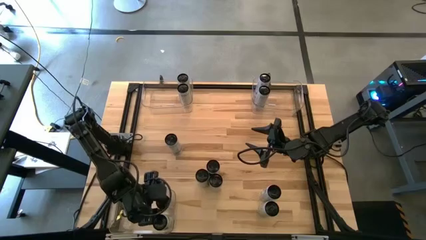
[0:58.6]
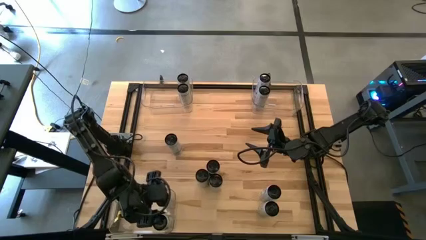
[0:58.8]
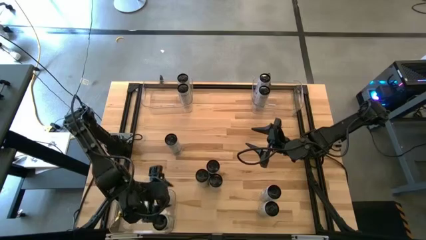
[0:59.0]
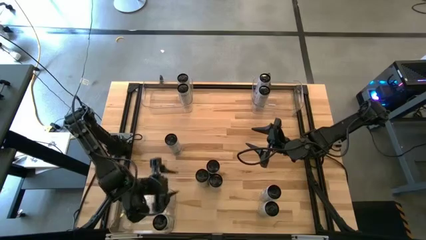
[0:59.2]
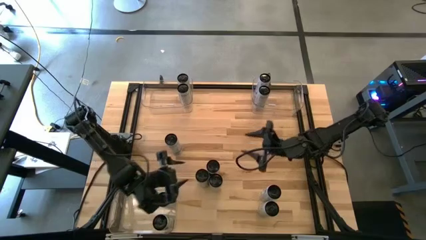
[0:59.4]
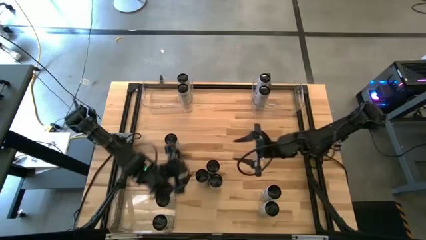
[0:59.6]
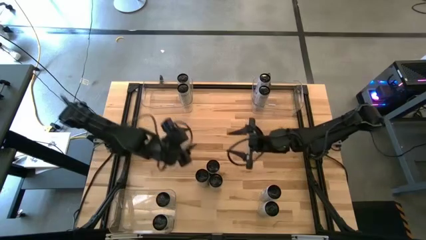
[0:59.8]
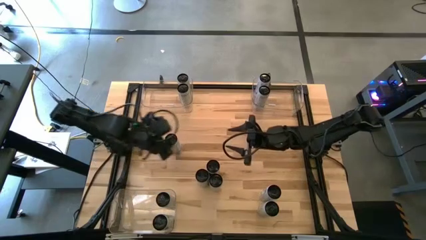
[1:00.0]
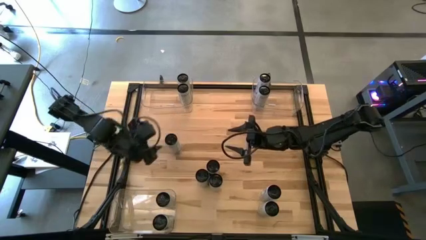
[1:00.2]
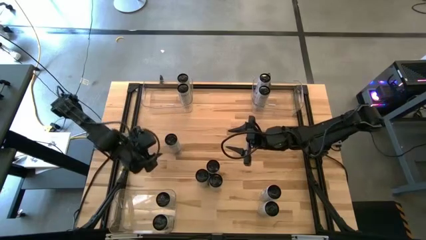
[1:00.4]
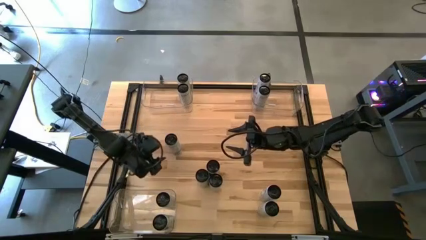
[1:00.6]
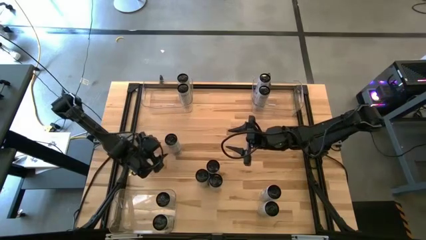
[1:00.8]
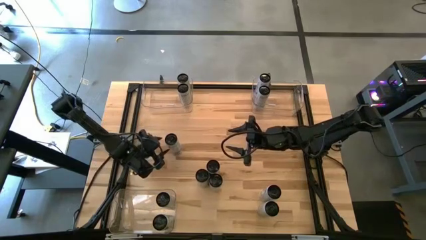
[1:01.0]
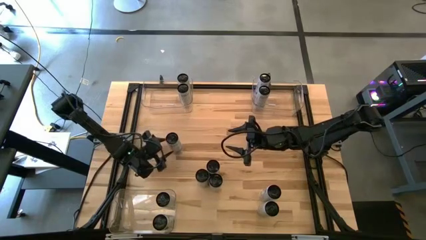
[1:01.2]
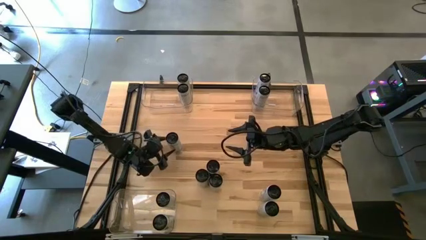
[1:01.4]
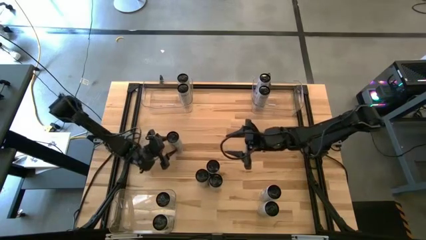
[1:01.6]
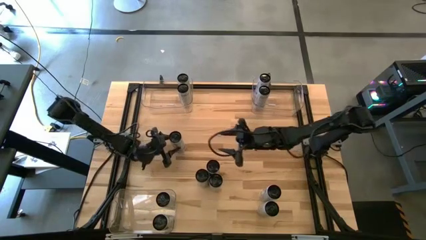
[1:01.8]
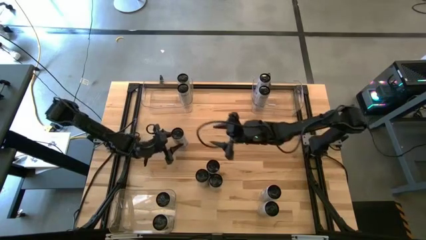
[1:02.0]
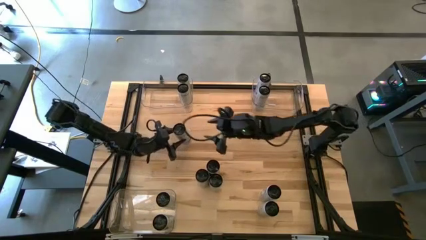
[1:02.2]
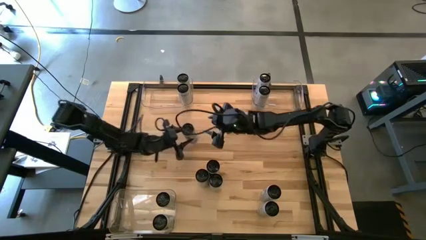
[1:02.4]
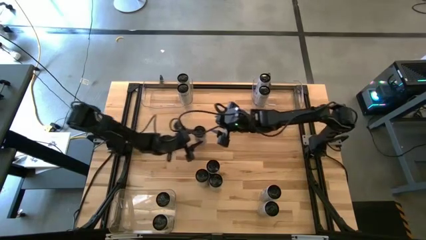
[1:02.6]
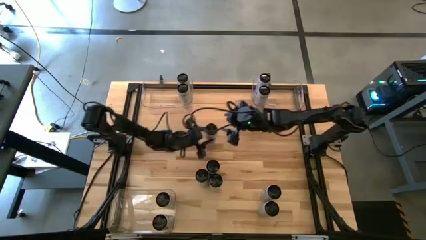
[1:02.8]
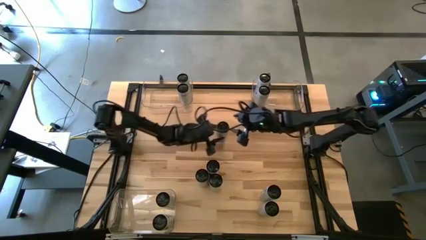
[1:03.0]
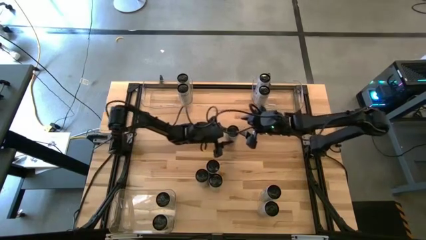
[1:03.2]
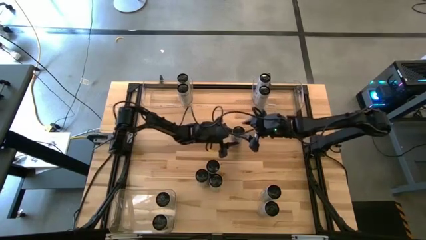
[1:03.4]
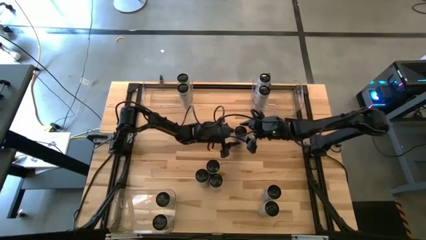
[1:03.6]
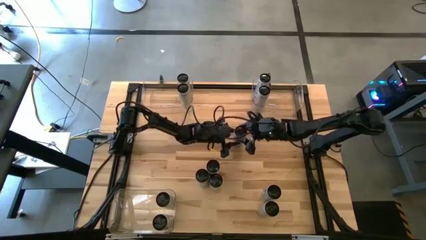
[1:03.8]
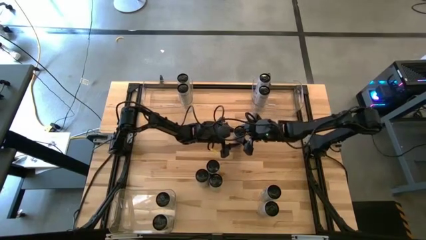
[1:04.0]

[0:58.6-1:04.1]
Task: Sort soda cans
Move the white soda can to the top center

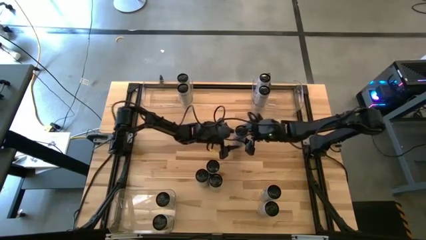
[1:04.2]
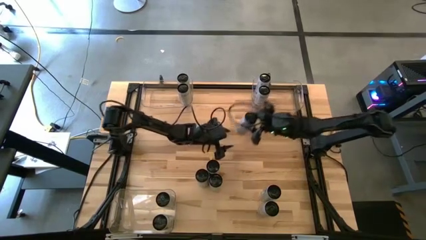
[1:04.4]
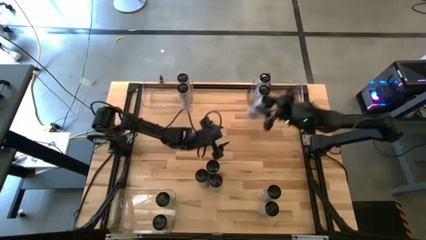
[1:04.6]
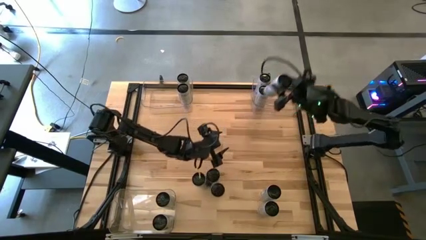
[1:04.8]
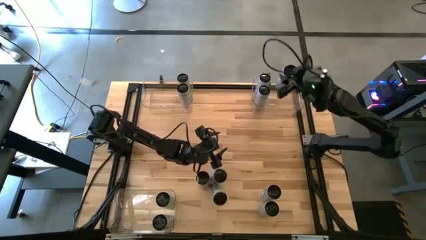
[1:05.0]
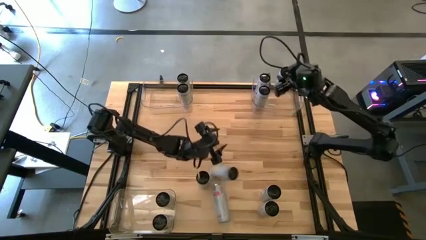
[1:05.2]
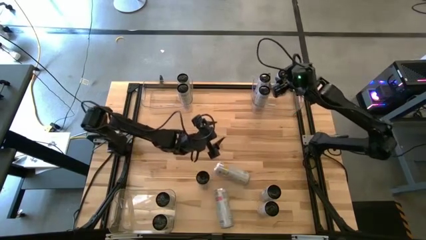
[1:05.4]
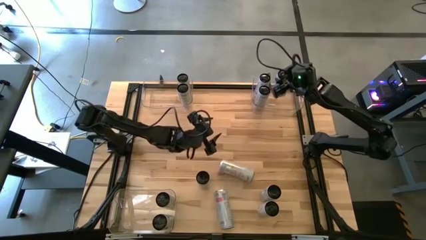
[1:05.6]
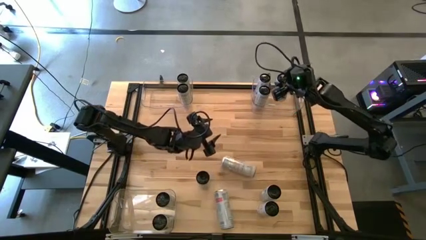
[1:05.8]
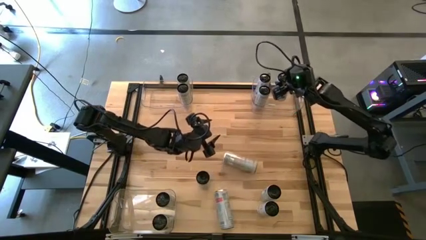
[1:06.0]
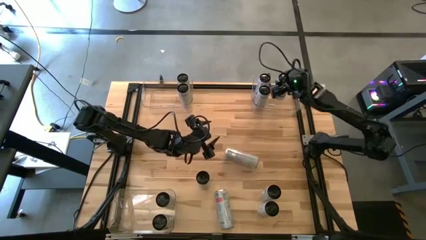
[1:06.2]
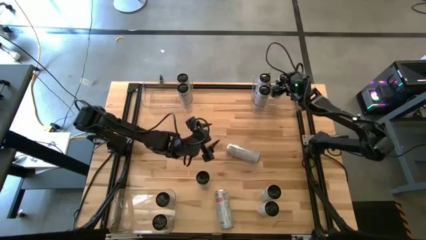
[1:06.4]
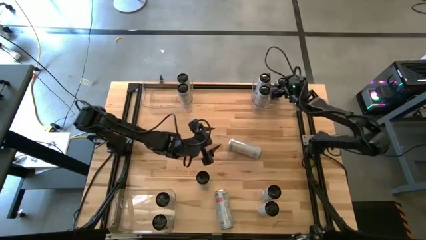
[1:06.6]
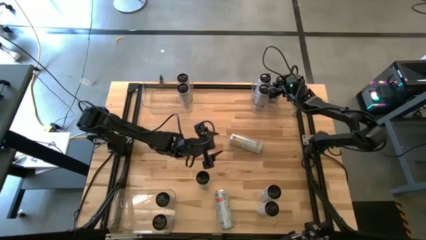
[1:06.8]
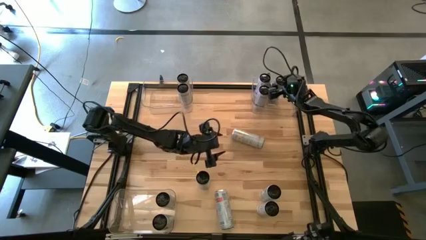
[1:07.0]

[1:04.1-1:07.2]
Put the white-yellow soda can into the top right transparent bin

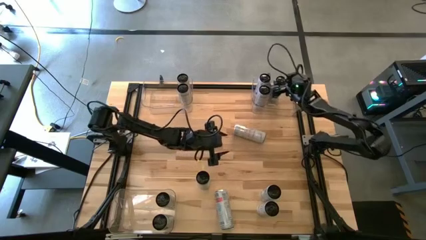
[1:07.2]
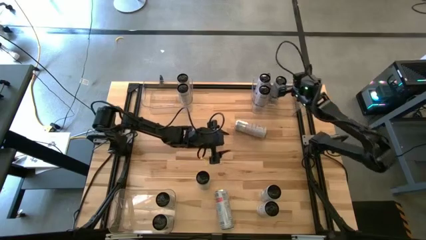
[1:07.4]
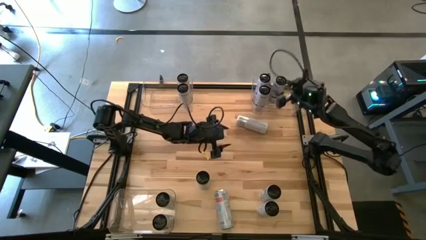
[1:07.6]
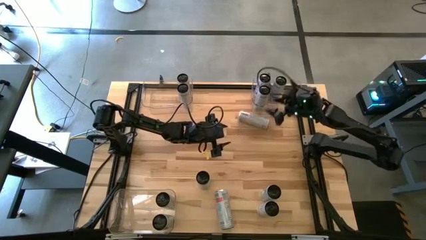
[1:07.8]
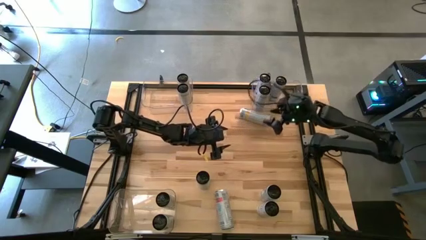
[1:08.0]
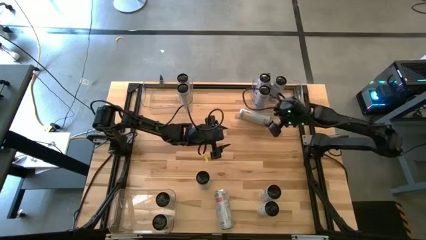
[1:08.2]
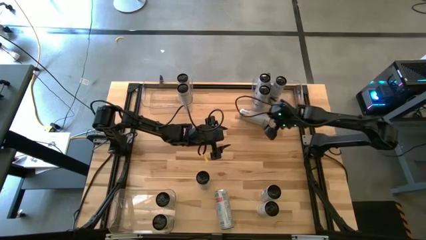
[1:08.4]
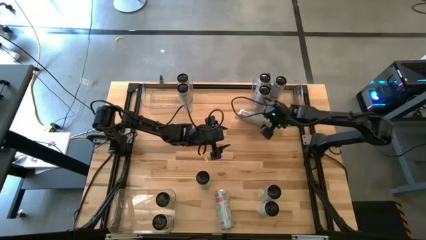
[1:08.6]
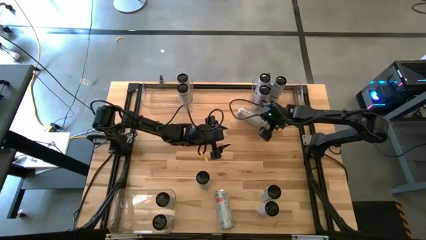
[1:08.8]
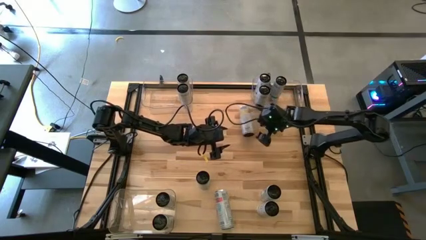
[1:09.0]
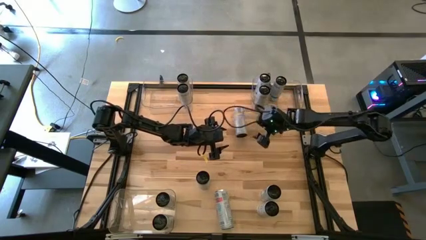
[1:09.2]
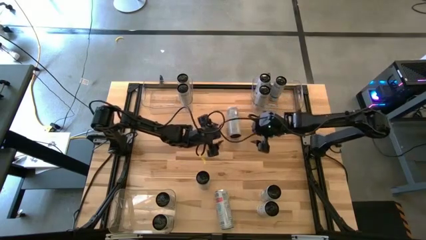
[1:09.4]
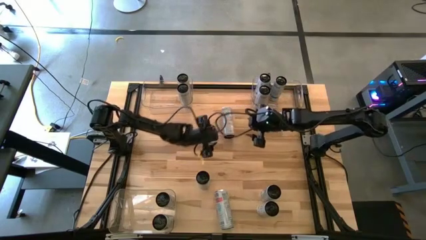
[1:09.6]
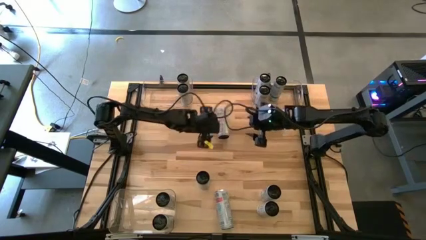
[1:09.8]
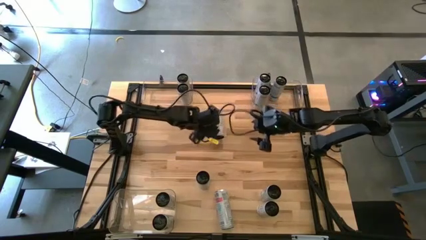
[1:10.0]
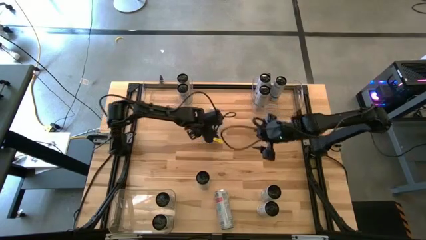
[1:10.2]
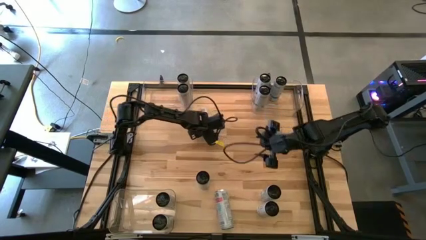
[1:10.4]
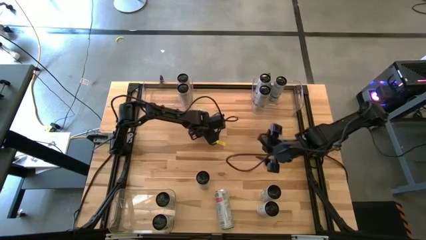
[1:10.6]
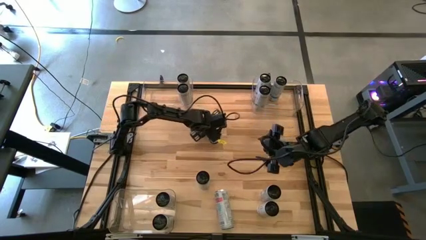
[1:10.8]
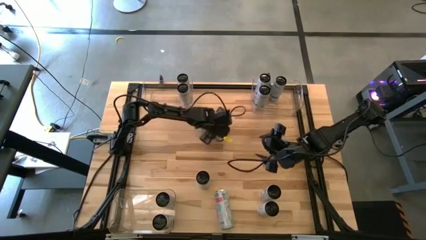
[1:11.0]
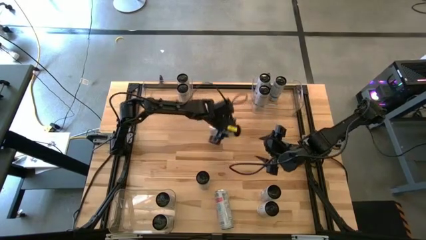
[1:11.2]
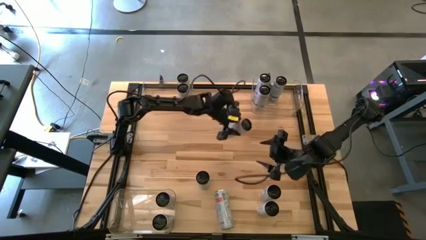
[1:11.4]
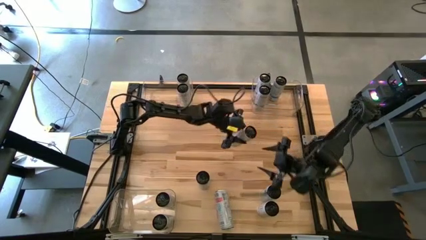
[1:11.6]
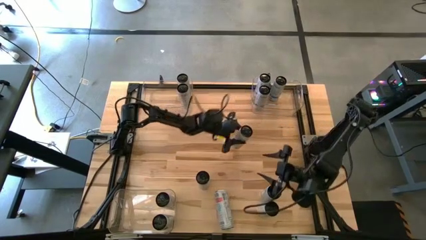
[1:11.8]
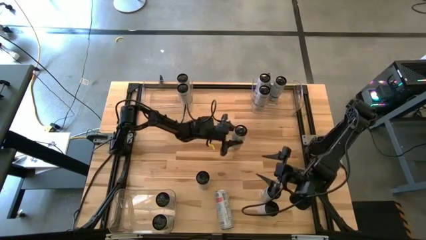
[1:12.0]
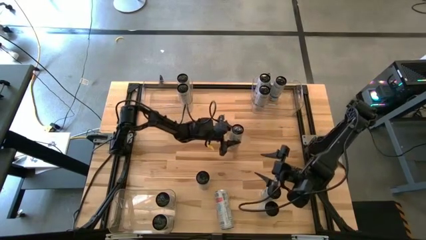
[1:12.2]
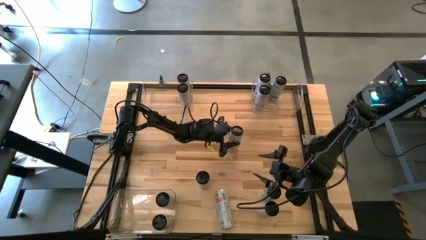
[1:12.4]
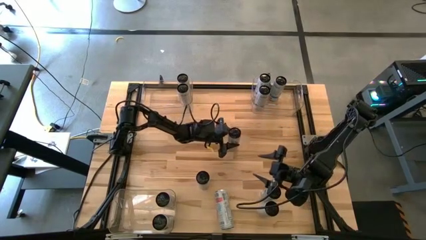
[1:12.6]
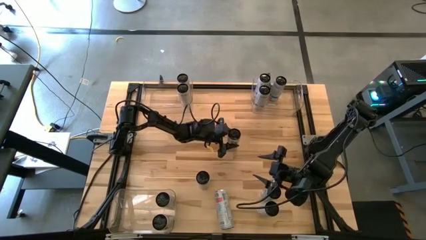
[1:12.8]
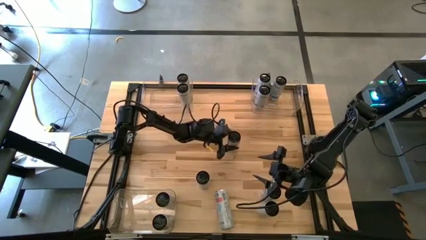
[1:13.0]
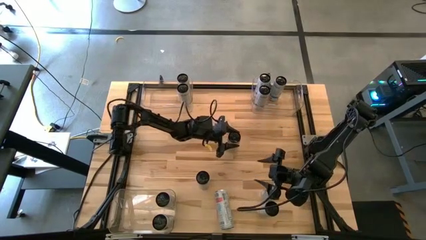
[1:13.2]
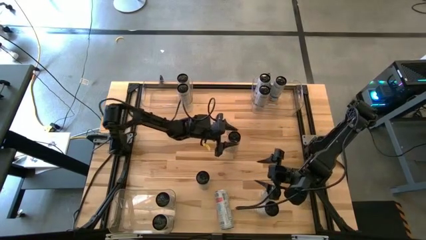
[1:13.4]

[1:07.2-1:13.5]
Adjust the white-yellow soda can on the table

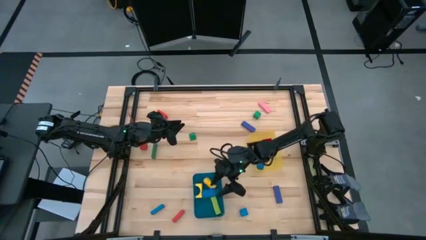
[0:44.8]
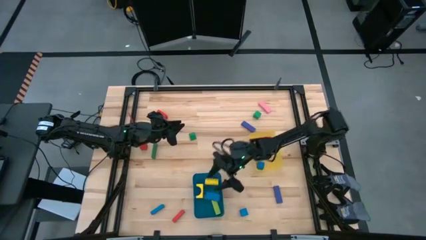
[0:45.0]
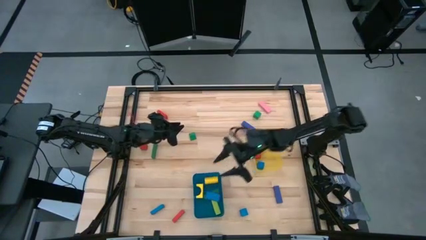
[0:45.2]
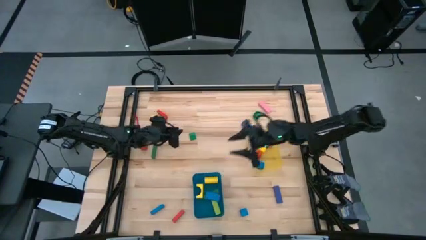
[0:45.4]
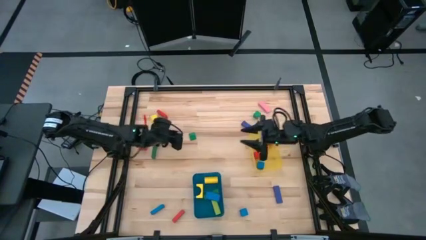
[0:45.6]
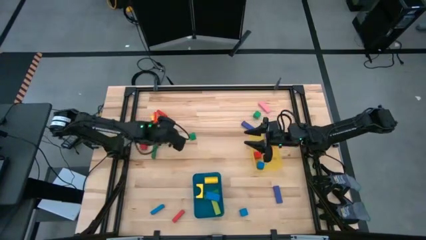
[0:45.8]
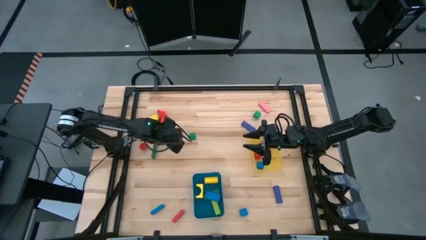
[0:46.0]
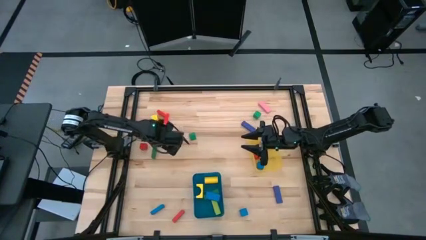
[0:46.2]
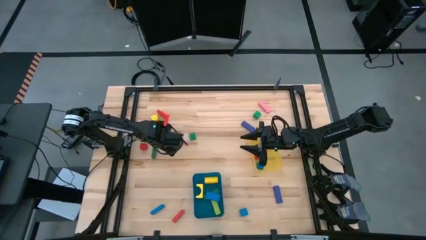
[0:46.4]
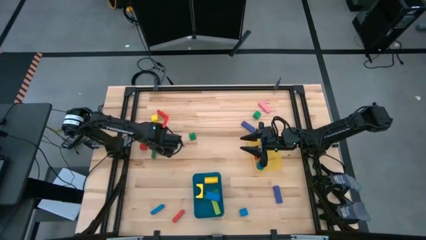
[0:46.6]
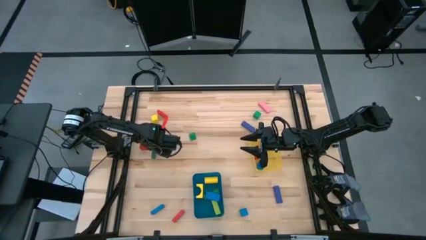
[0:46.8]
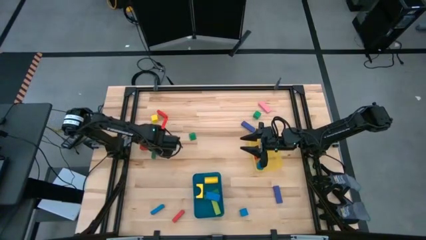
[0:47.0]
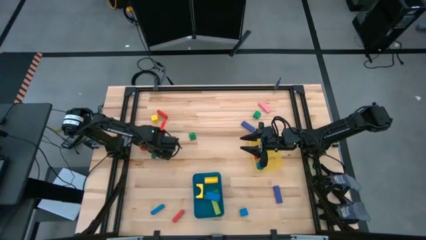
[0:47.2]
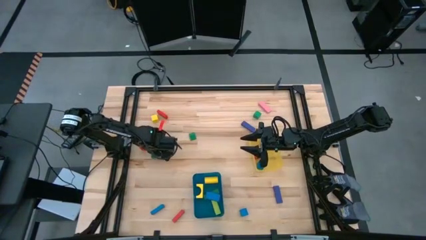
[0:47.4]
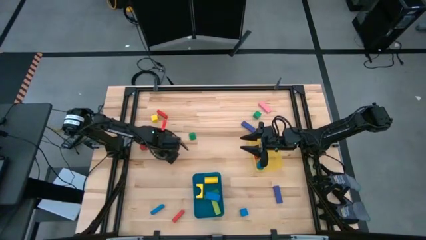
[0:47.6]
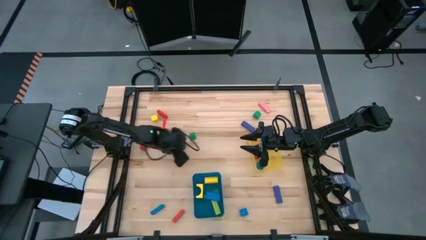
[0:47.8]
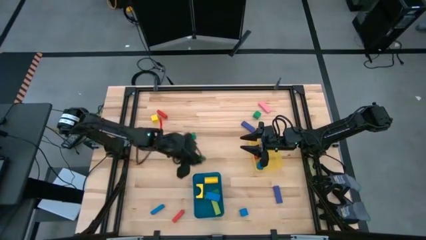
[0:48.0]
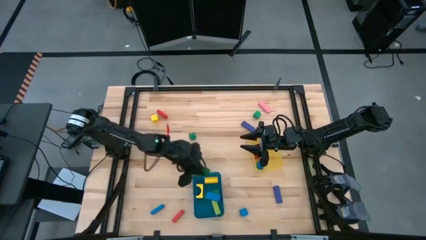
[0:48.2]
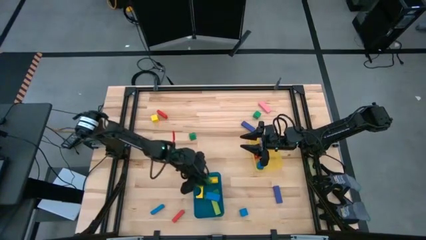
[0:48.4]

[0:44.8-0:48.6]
Task: Sort blocks by size
Put the large green block into the blue bin
